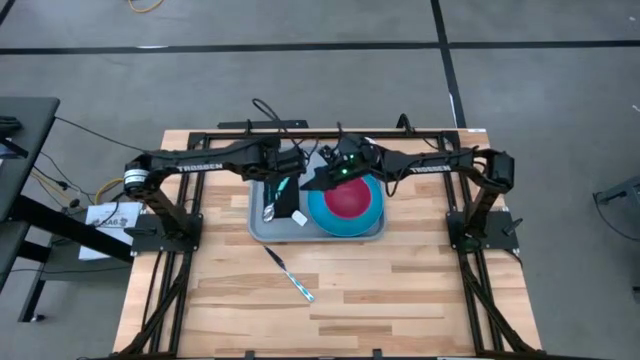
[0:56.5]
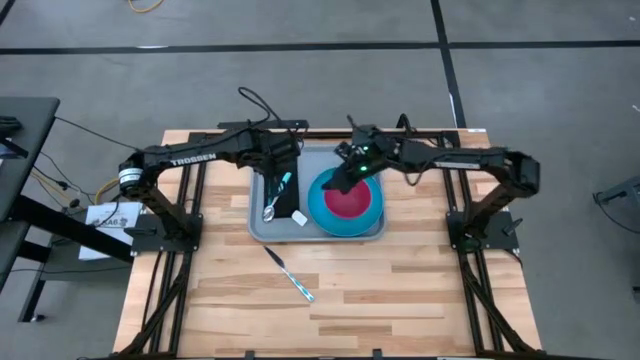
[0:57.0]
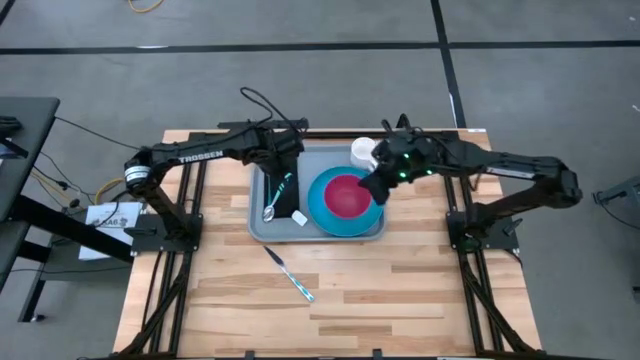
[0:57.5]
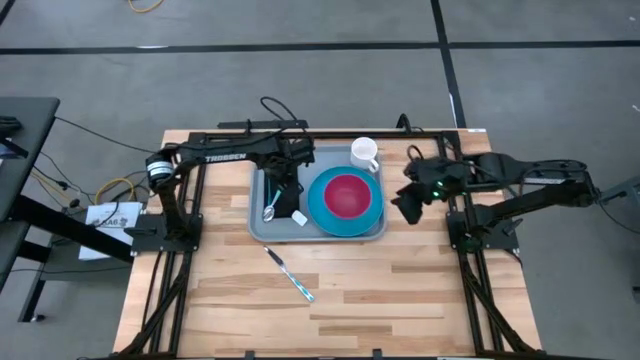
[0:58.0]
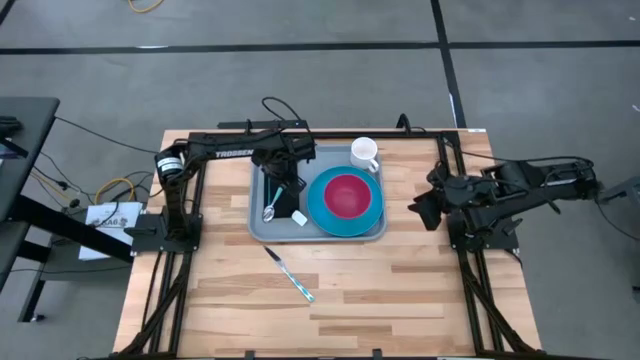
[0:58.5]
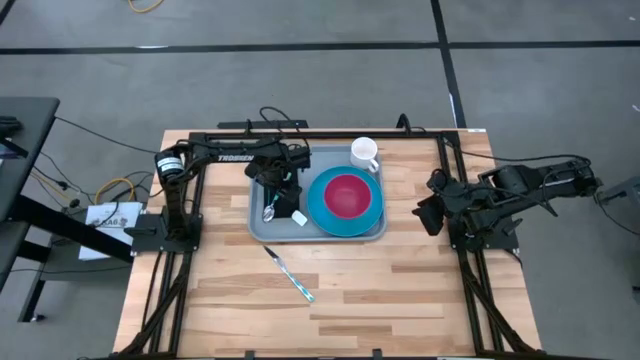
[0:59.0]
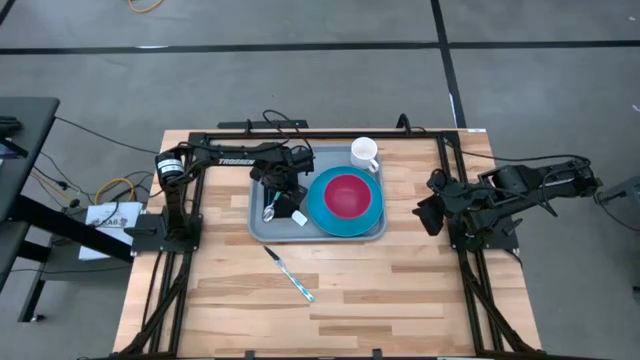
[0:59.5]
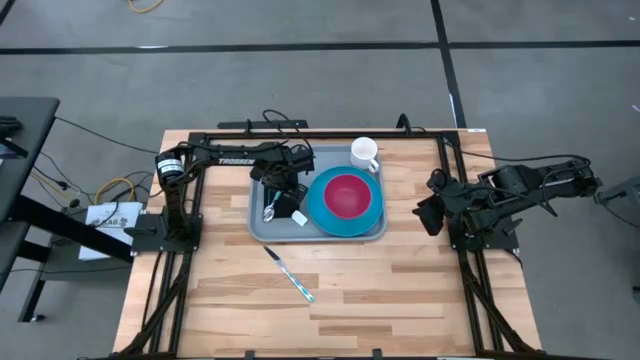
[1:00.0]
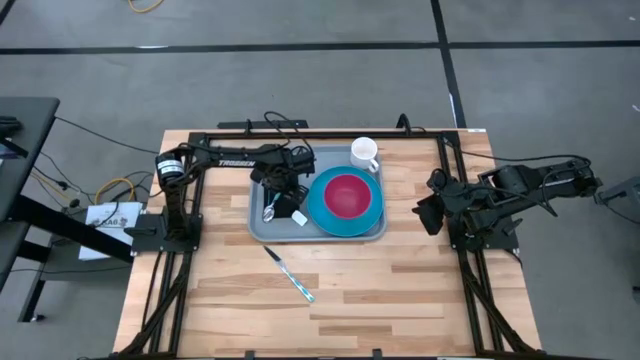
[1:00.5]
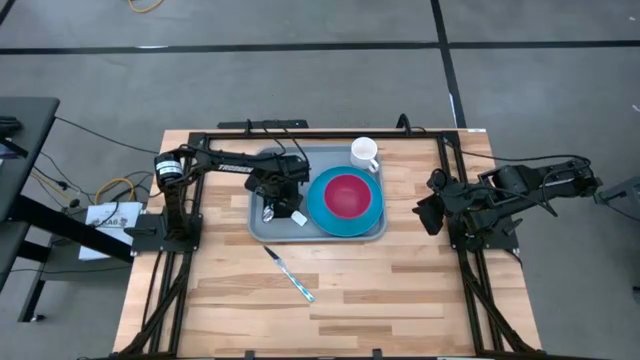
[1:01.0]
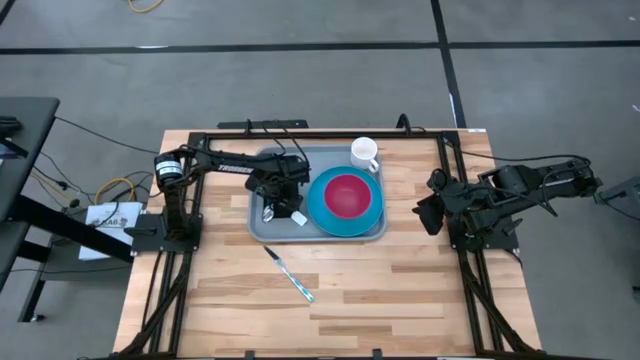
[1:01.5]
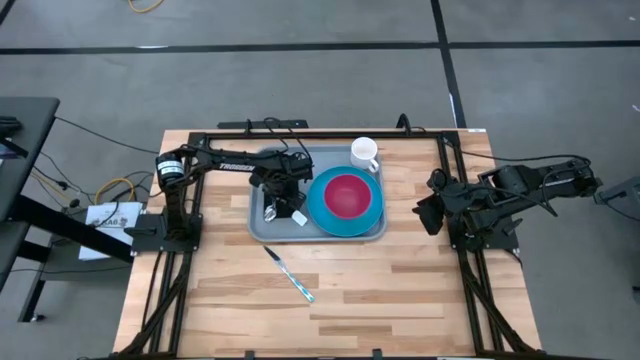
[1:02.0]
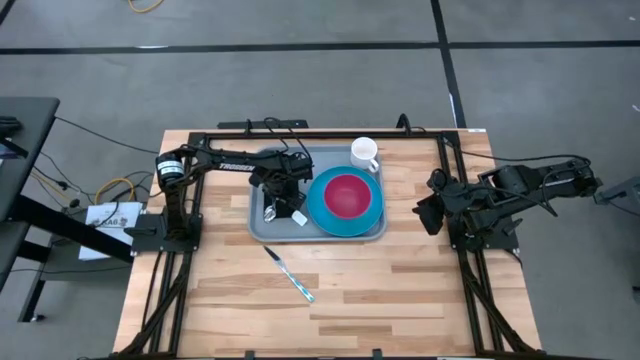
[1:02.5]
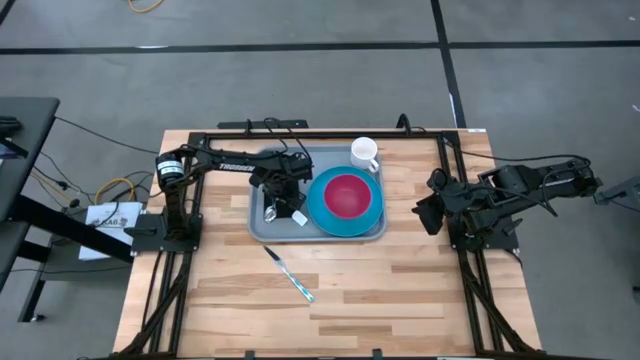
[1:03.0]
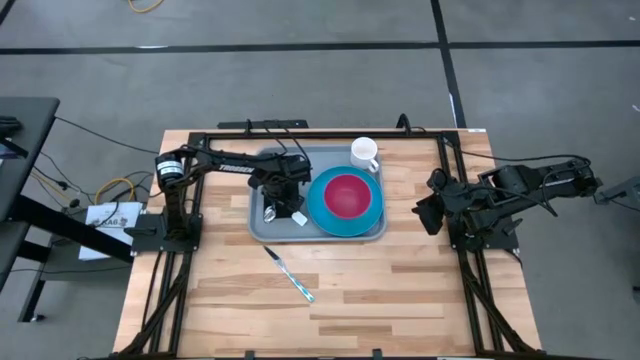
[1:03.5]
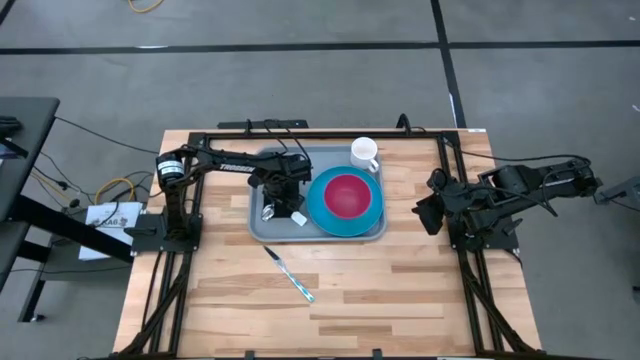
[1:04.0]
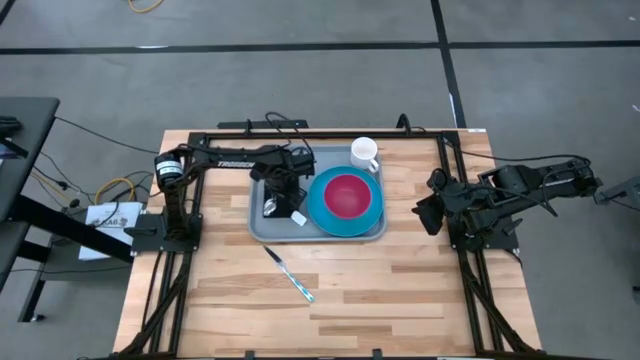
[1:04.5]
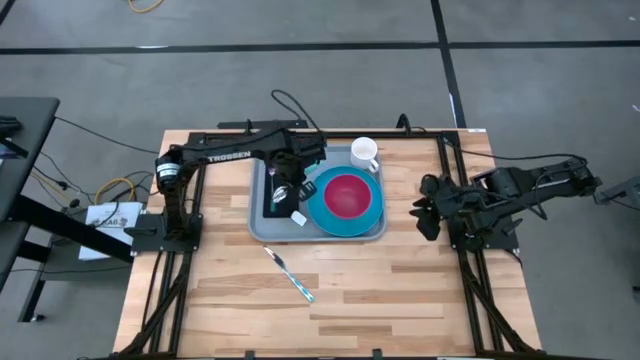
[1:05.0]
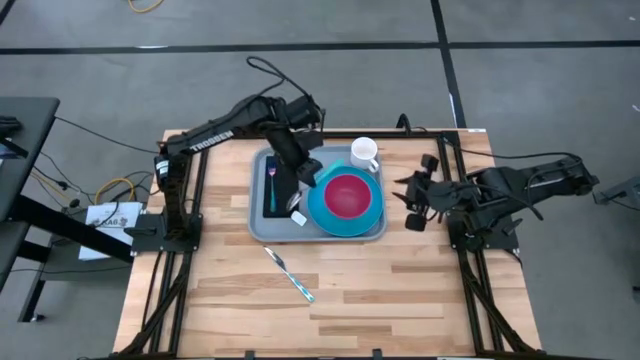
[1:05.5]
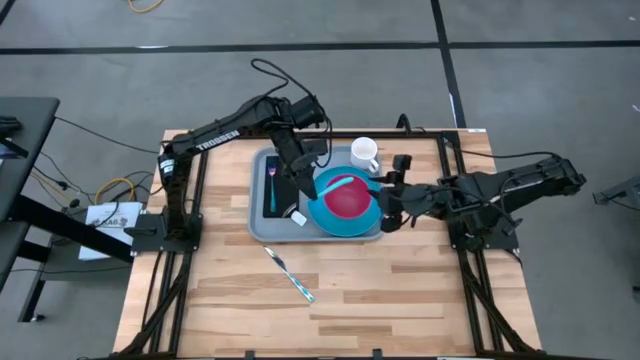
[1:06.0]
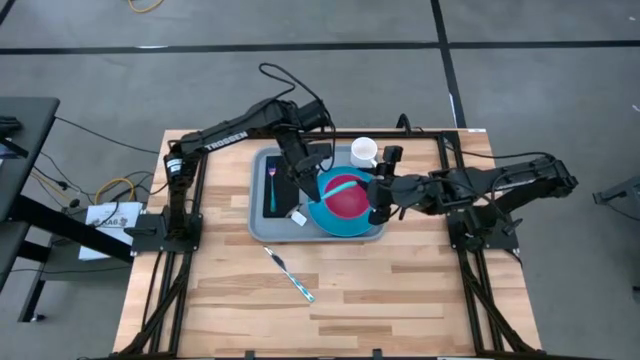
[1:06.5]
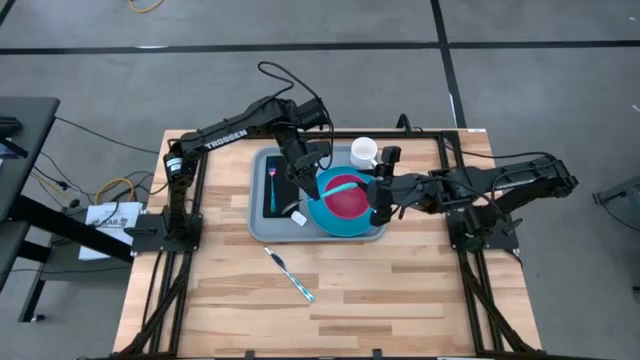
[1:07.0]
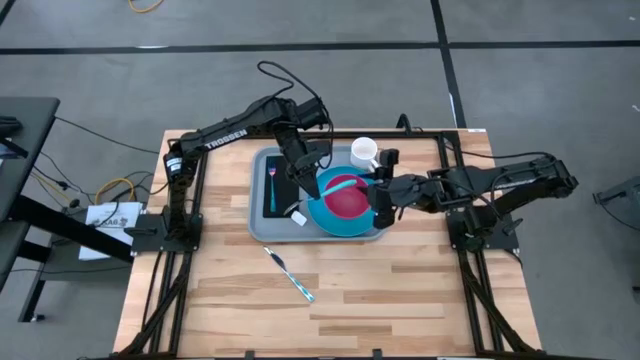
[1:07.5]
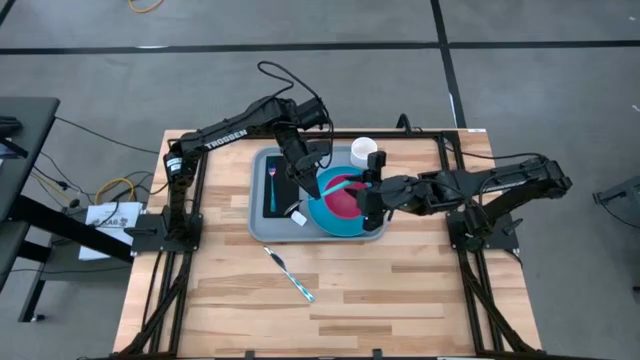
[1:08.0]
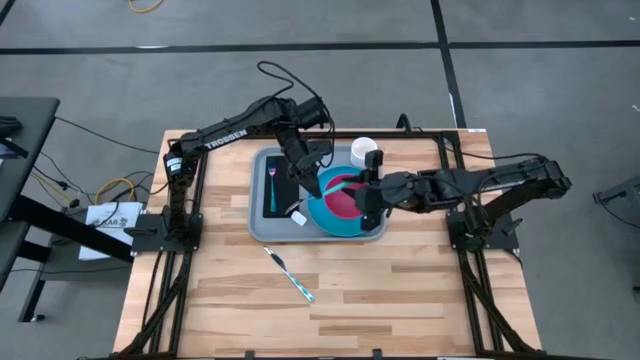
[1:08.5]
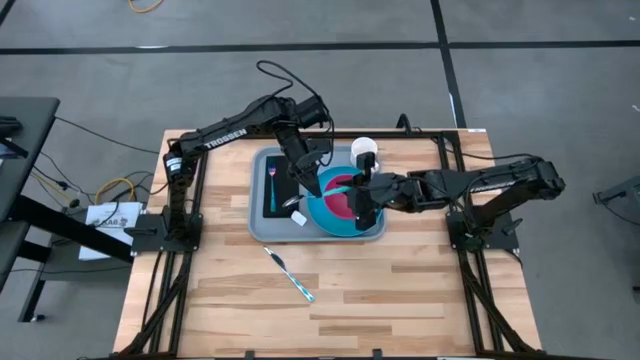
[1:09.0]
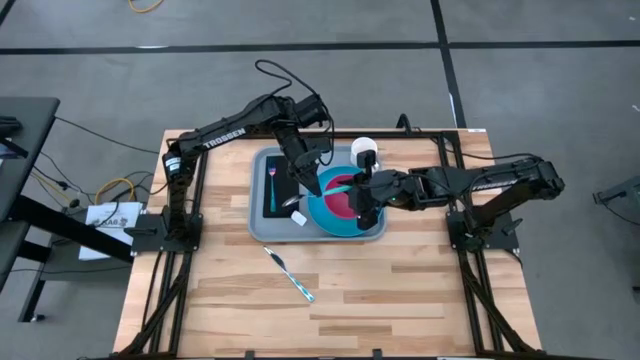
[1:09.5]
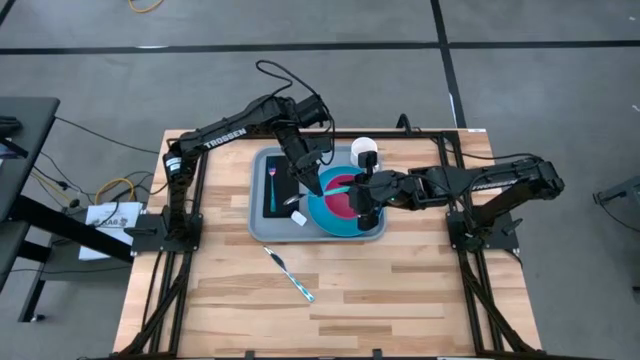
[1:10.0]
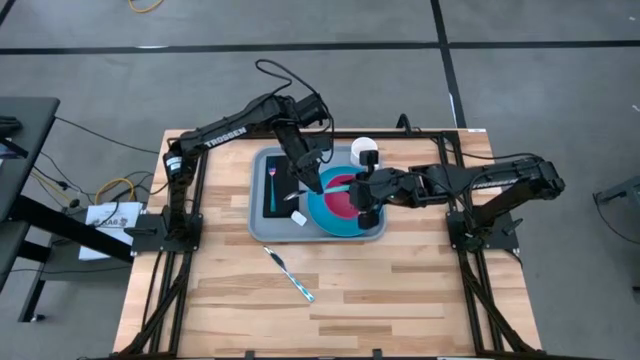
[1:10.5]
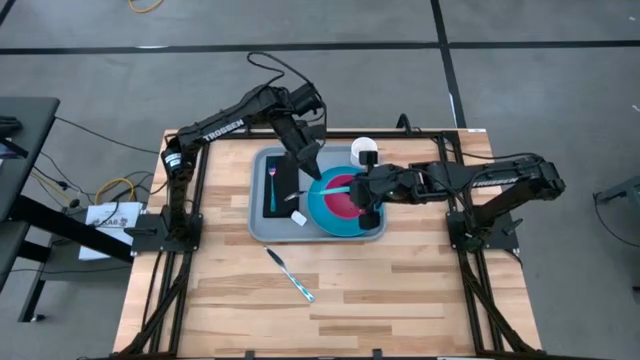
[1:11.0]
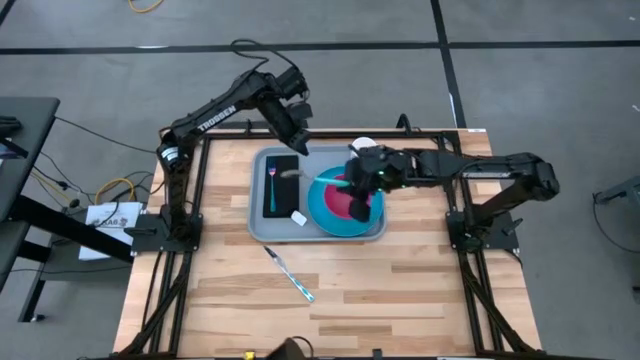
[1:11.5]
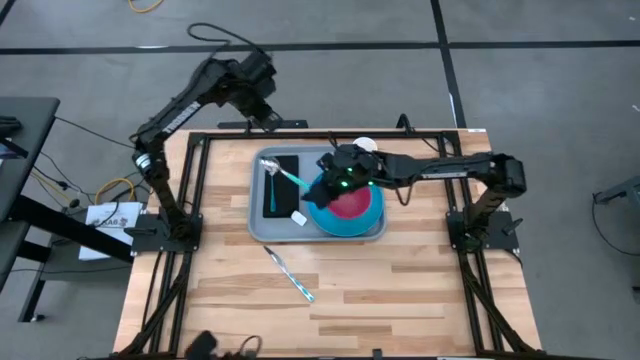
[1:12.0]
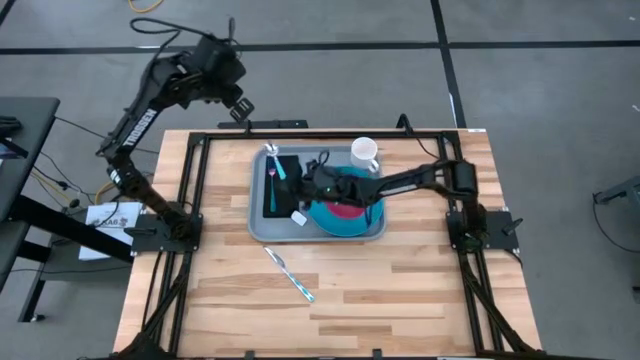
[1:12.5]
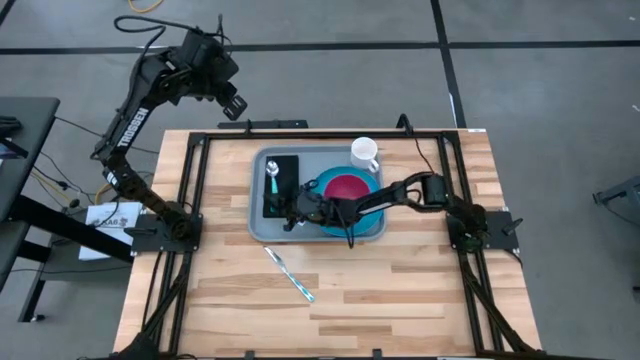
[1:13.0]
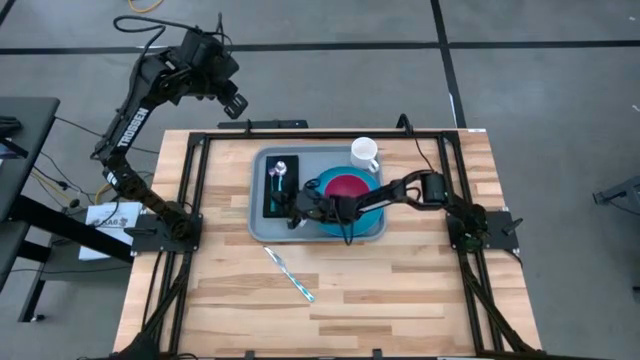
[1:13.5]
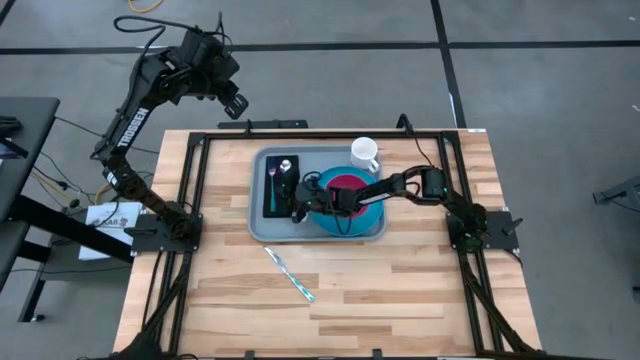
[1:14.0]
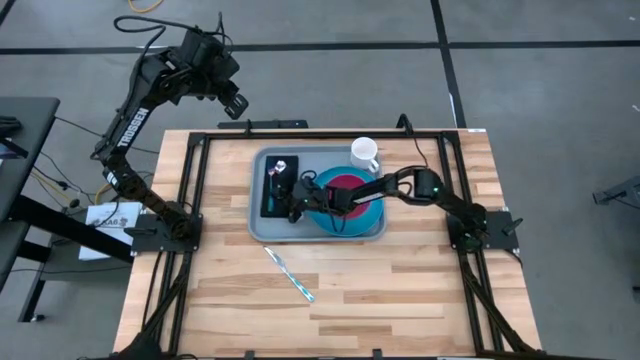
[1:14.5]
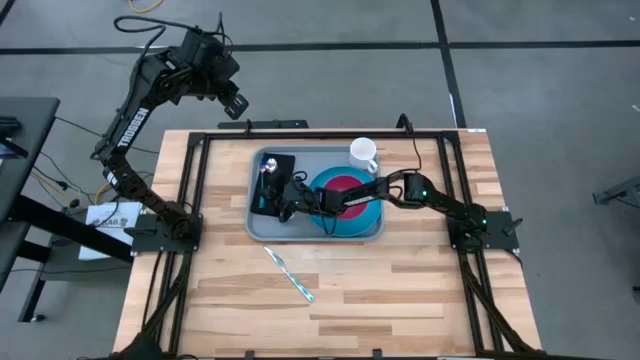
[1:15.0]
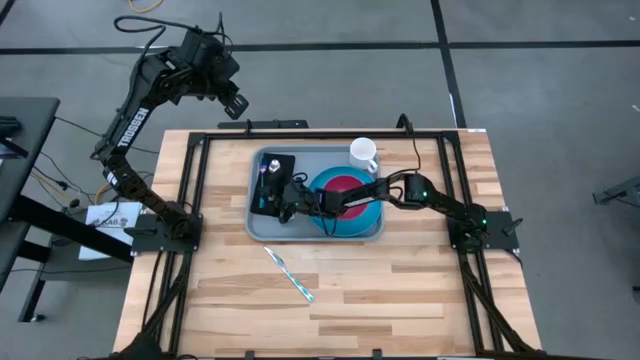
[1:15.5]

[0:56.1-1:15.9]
Task: Set up tray
Put the blue spoon to the right of the blue fork on the black napkin on the gray serving tray
